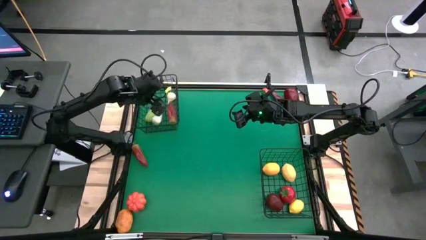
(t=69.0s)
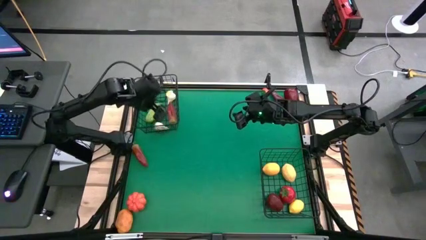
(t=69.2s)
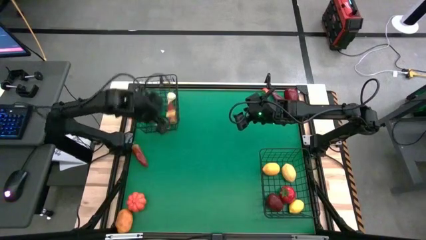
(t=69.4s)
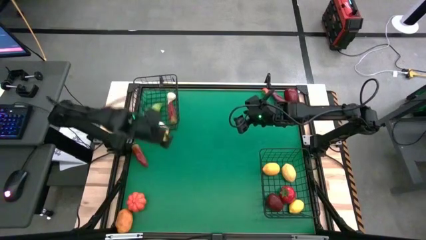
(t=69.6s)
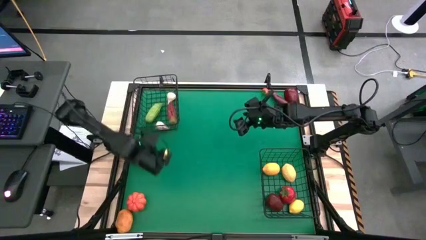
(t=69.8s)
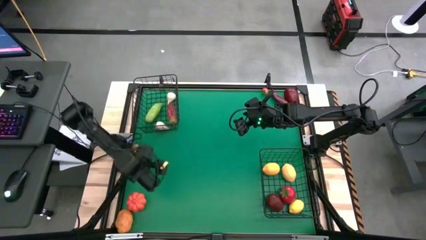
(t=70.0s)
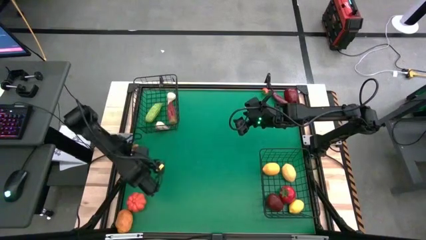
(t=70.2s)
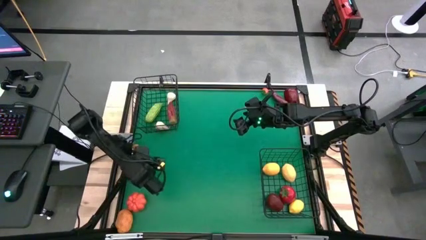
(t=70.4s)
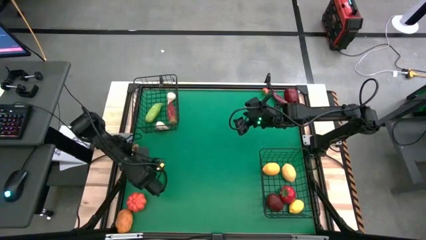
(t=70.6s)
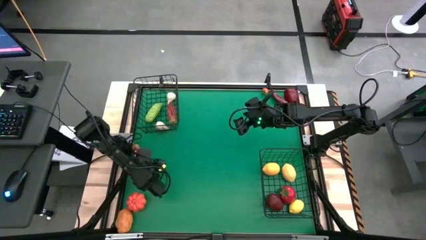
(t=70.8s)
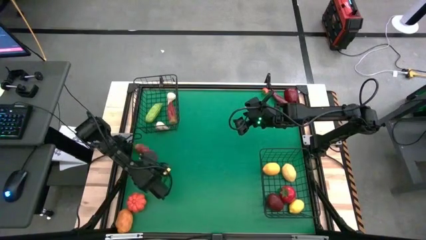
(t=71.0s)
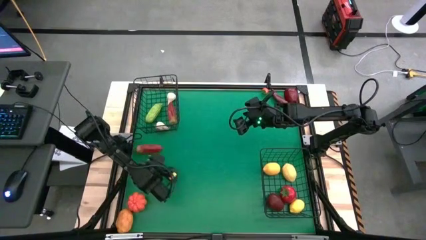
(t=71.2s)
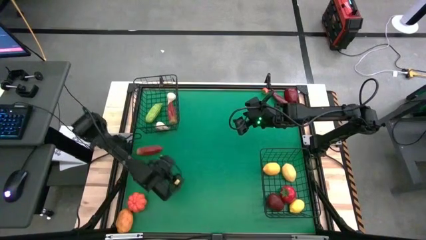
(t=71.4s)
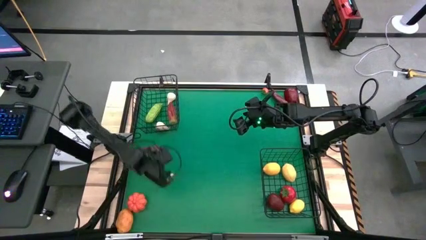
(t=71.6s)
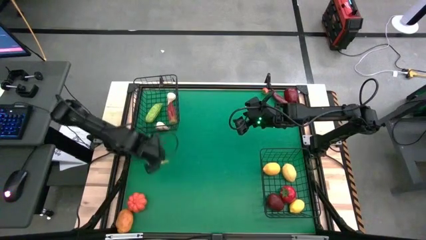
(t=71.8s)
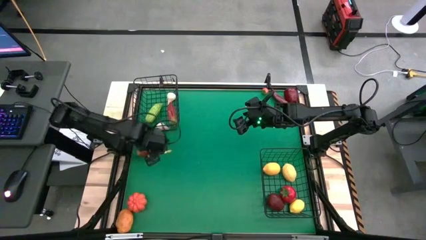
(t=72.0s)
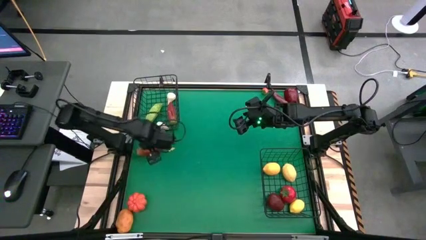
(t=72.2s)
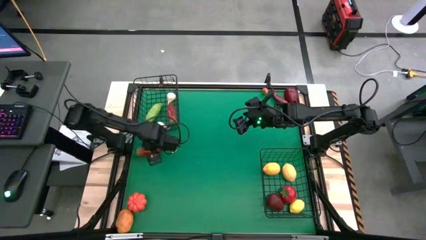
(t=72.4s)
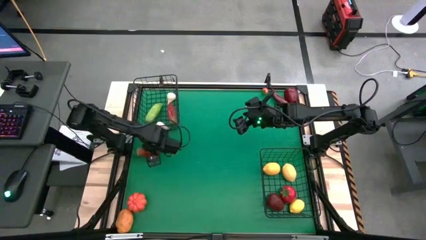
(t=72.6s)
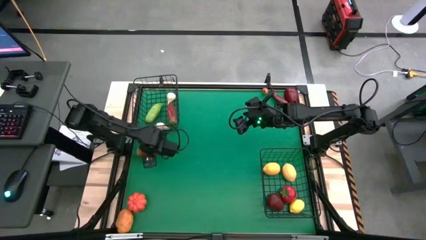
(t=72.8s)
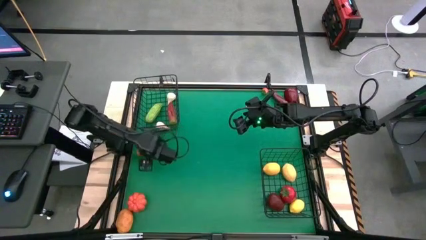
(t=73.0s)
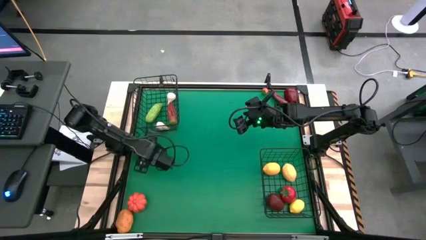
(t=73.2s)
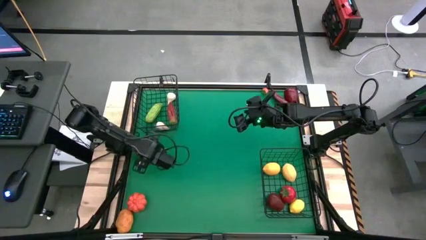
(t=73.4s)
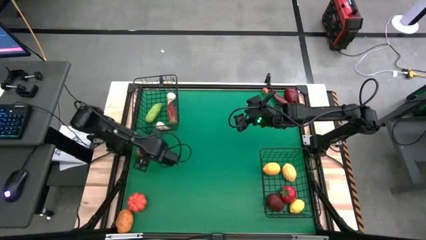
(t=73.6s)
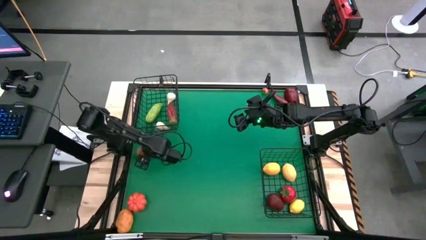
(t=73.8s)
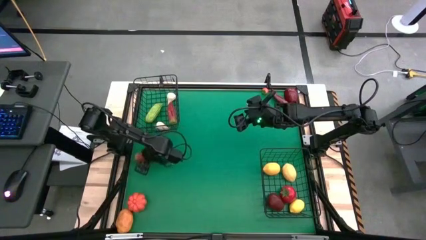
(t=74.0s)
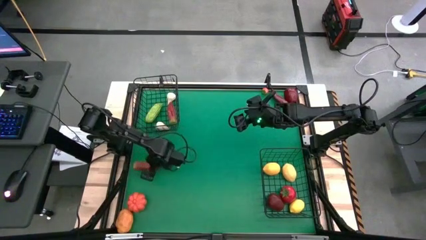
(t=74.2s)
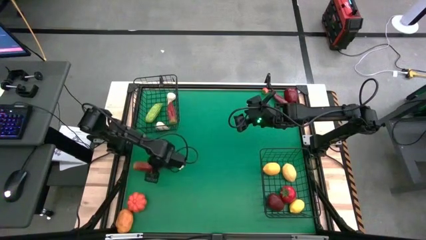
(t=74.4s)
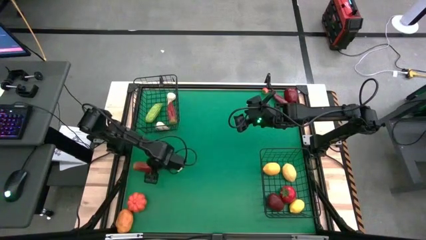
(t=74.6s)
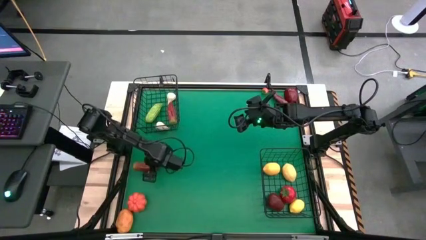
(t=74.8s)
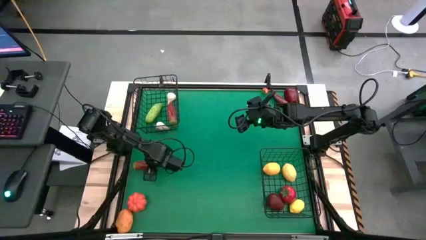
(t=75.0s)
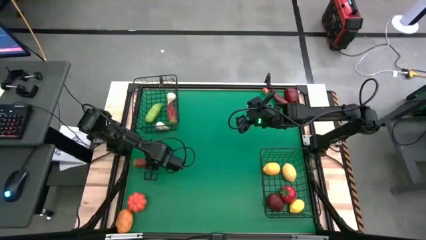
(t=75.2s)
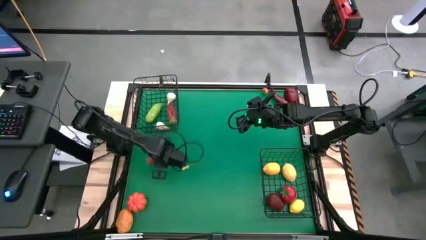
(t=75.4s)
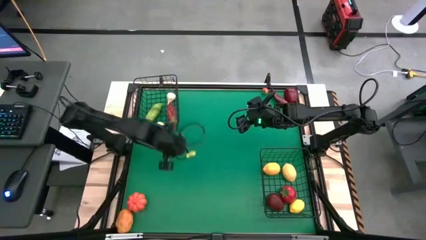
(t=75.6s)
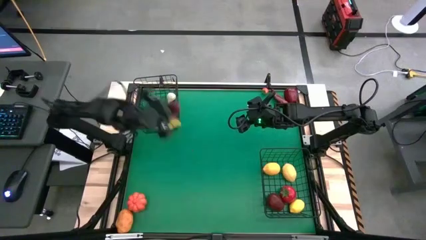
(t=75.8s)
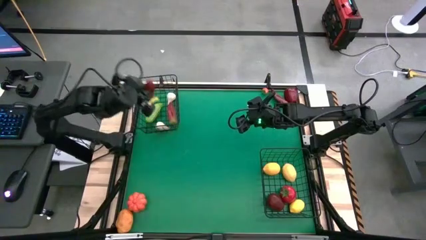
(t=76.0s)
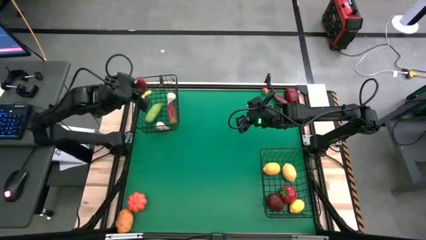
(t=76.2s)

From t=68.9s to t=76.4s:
Task: Sort produce into baskets
Put the bottom red chili pepper into the top black wire basket

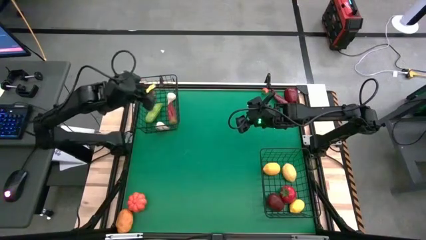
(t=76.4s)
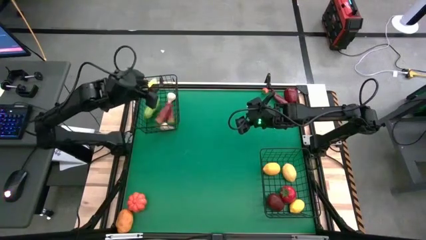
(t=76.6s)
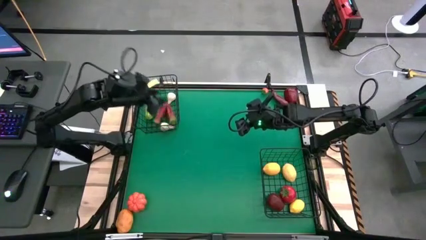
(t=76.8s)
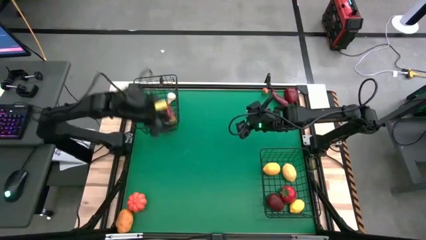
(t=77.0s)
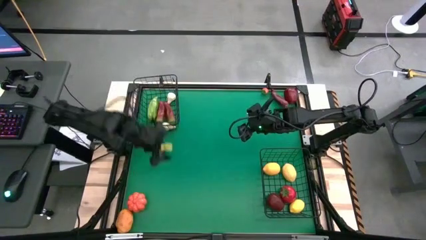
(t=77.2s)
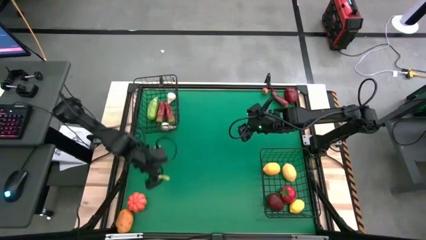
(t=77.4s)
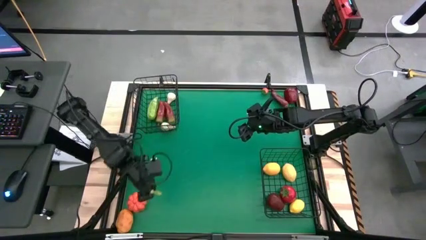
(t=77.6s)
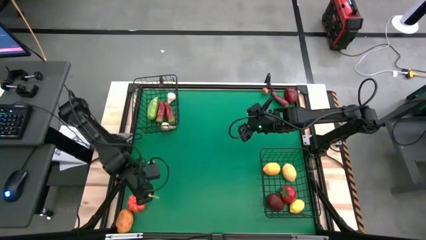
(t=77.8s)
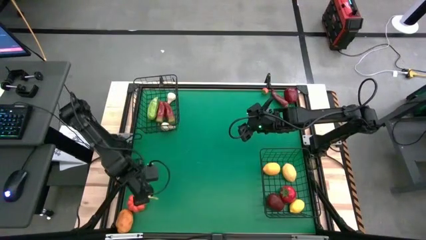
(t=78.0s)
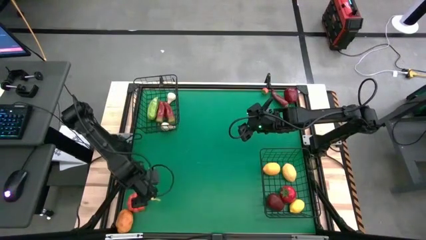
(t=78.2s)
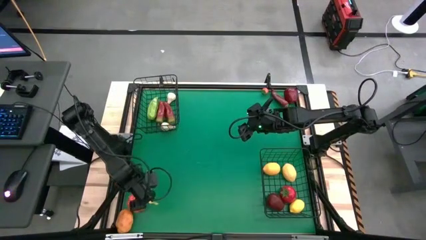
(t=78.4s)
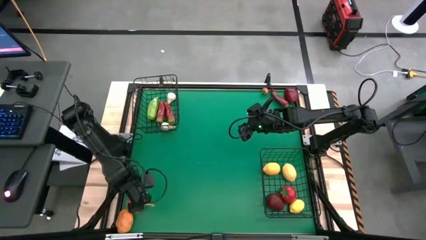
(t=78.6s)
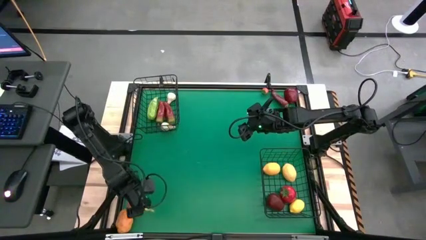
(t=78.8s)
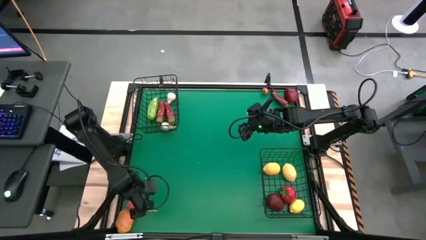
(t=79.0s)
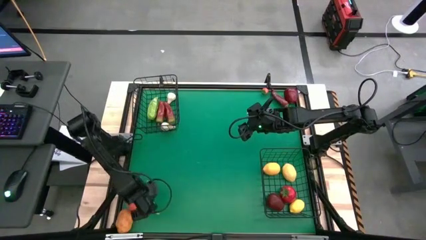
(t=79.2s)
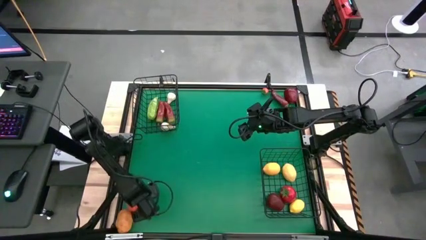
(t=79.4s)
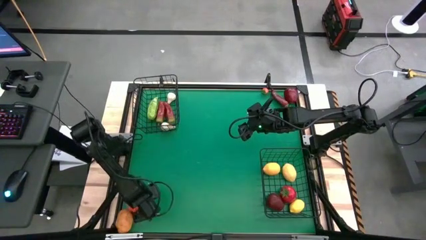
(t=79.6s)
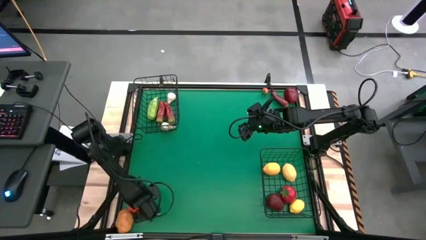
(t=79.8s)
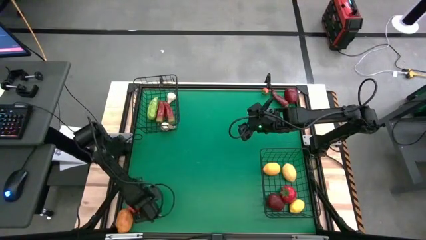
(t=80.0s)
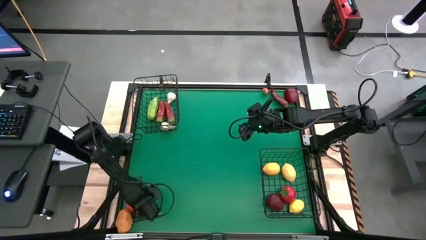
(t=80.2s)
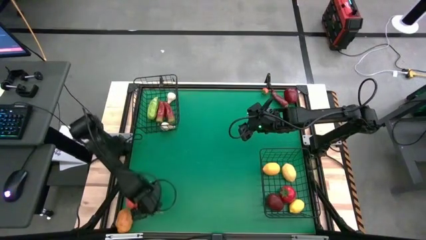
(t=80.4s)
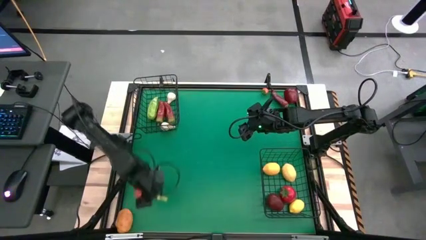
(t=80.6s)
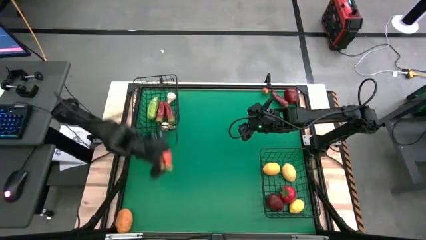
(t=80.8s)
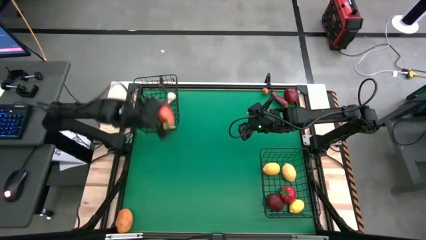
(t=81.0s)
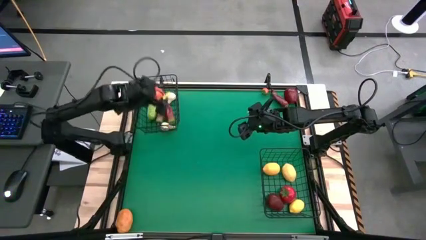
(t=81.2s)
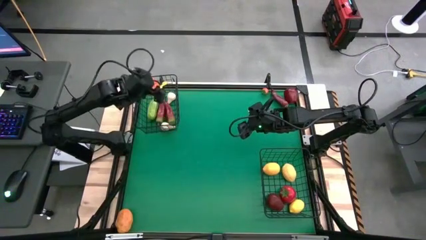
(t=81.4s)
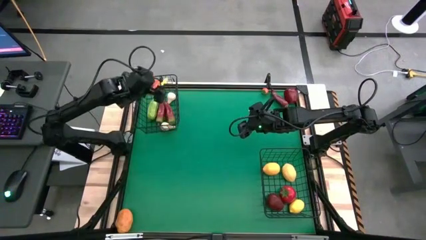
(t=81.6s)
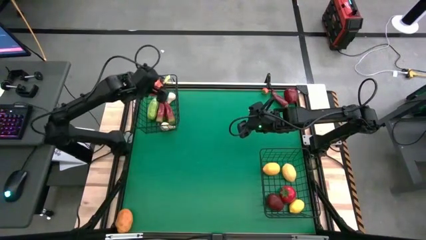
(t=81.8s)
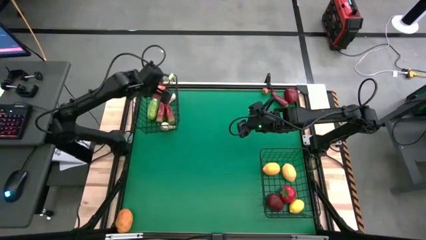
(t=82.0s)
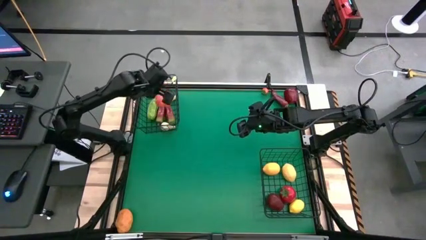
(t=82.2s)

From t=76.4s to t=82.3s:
Put the orange pumpkin into the top black wire basket

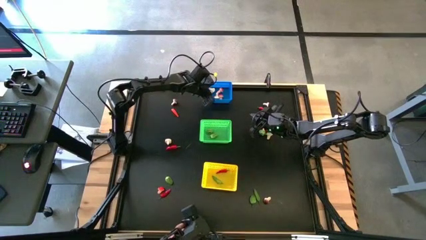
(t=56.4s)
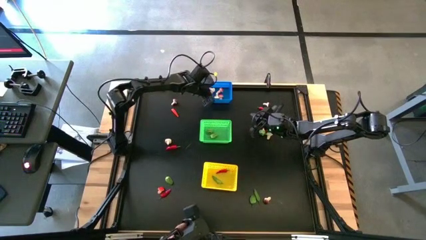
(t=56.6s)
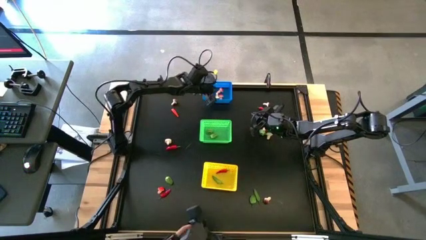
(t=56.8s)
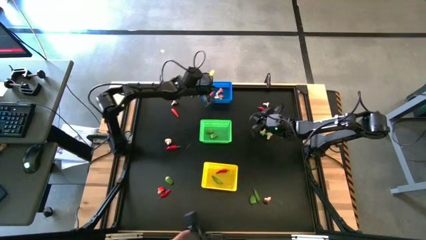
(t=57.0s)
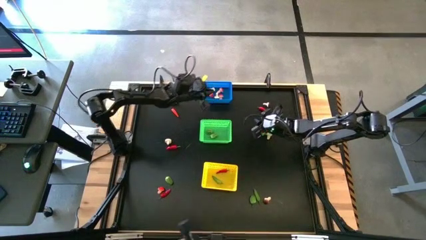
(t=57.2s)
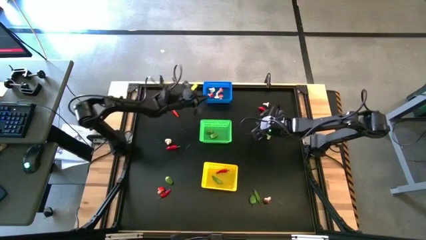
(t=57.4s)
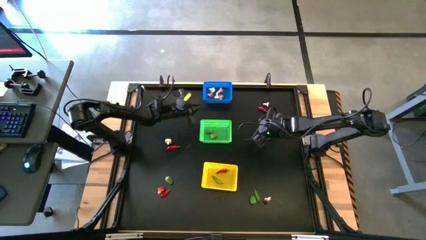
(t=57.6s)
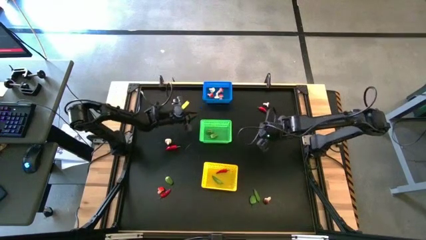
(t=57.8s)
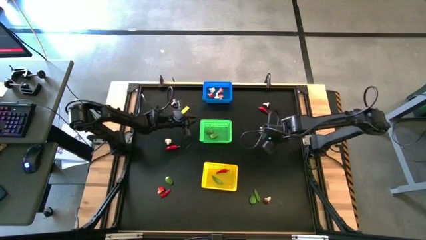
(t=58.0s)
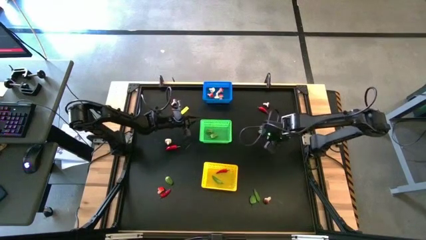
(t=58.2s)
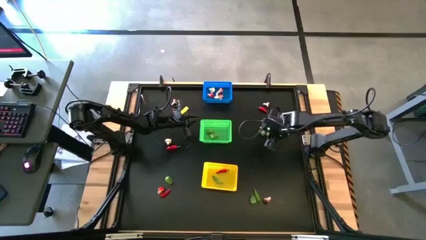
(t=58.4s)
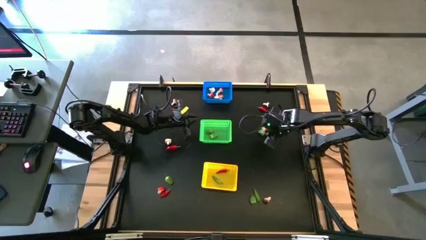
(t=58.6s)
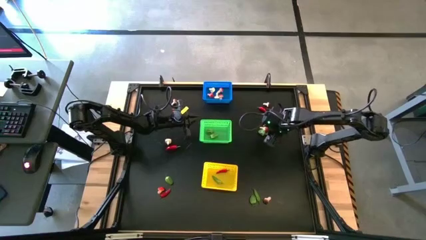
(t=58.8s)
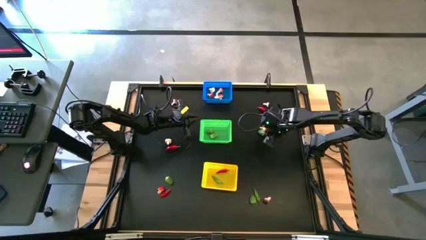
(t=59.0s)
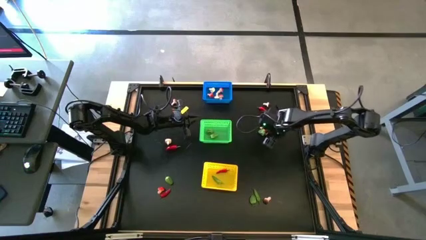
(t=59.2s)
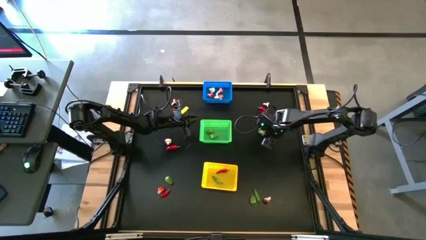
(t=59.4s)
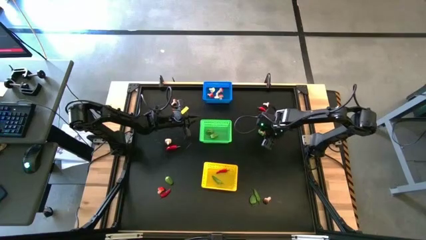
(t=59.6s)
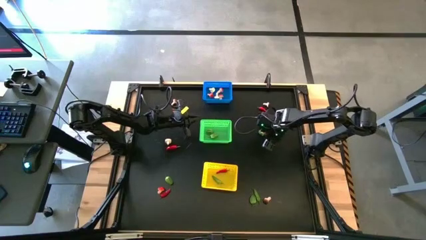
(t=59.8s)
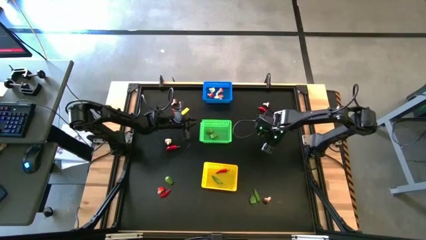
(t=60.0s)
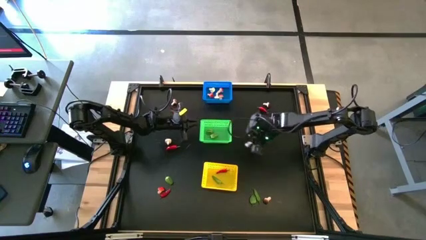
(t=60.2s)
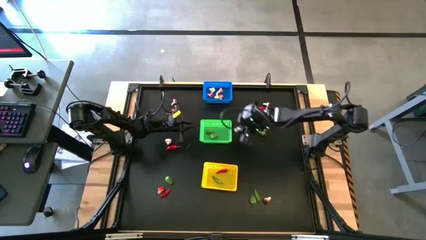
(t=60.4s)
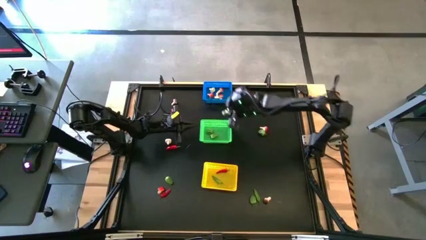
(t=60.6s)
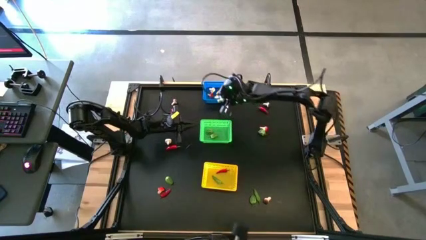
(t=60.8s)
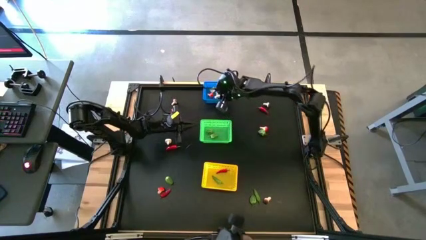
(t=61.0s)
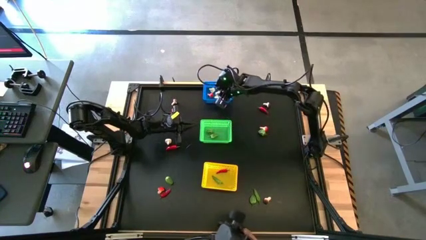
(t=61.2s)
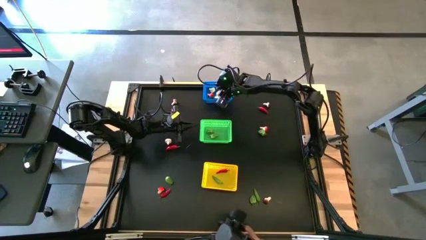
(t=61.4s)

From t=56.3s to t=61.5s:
Task: Sort produce into baskets
Put the green mushroom into the blue bin
